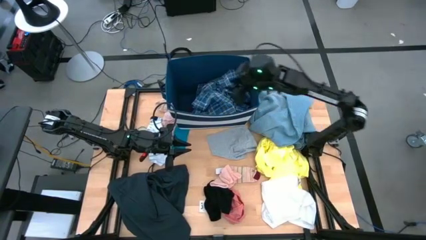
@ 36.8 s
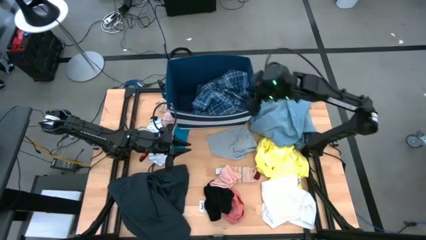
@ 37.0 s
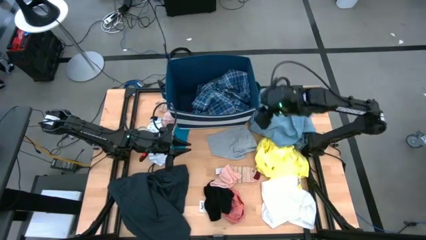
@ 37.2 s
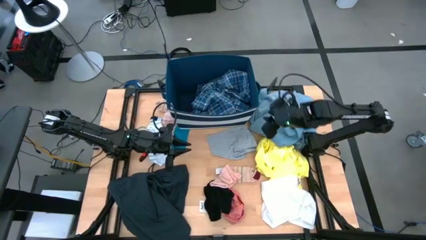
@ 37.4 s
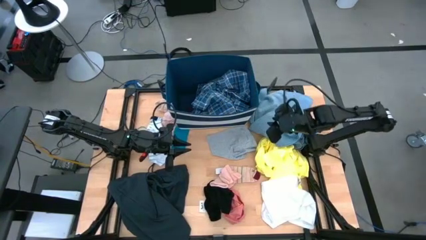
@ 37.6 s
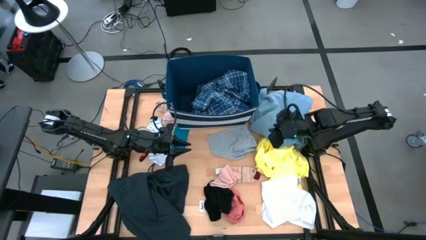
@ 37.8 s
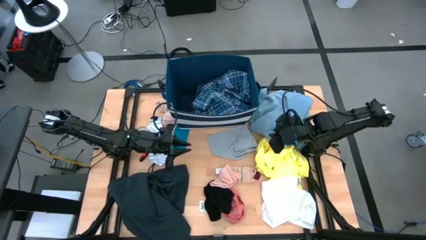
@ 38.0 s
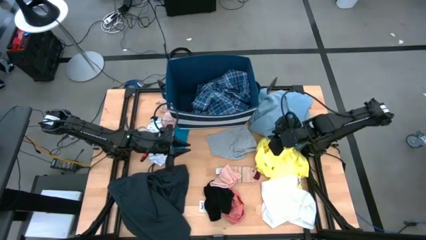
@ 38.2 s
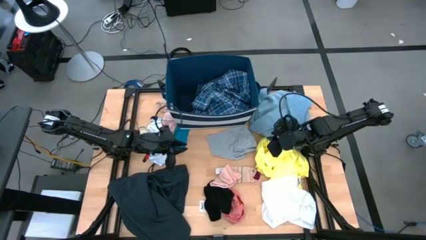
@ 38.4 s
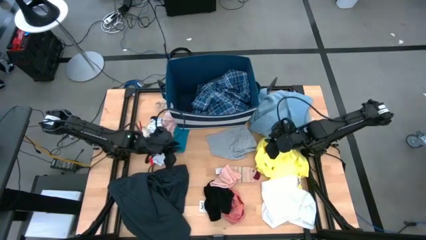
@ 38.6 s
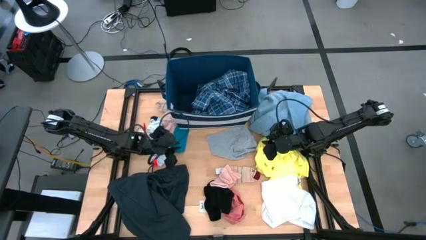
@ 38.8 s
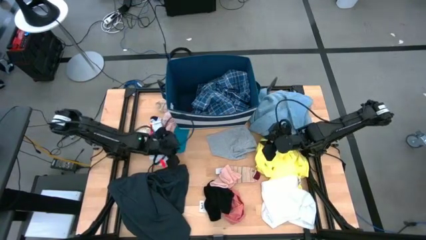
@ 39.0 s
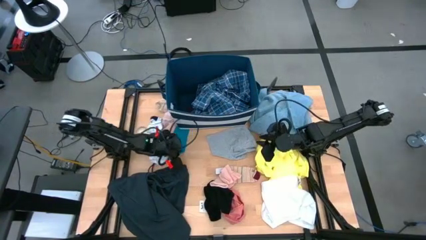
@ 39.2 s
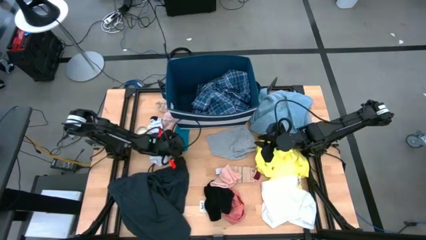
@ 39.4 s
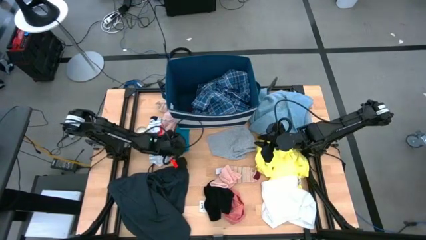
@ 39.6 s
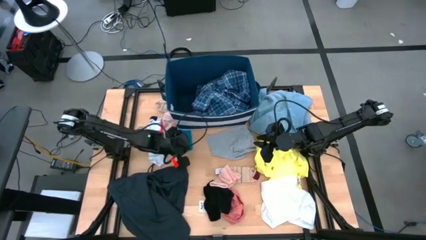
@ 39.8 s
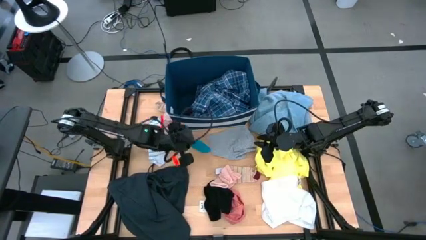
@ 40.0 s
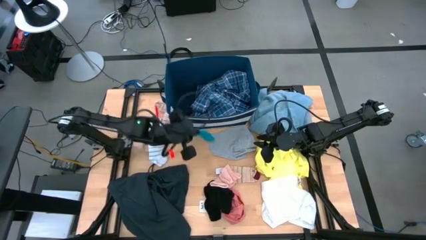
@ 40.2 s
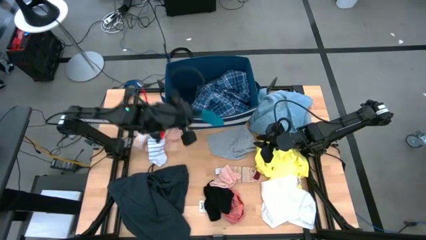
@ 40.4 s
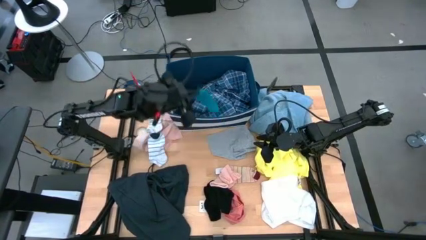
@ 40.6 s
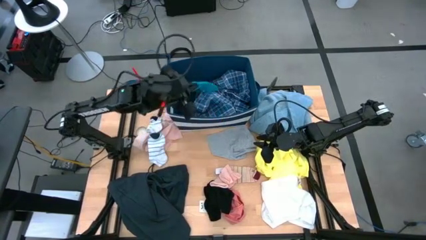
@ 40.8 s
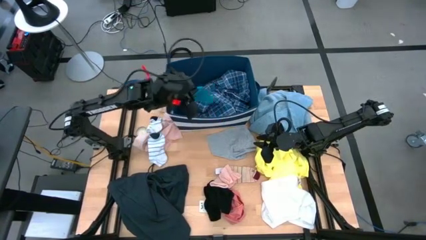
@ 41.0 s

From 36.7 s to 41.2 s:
Task: Sort clothes
Put the blue sock into the blue laundry organizer

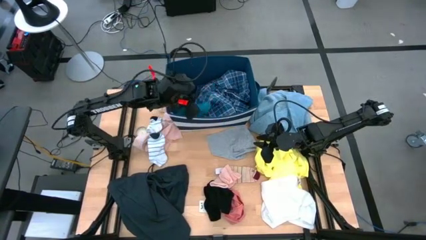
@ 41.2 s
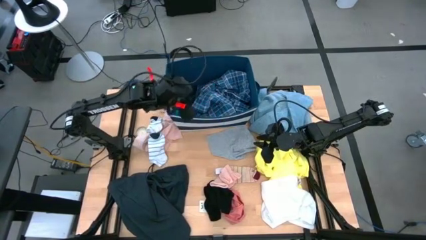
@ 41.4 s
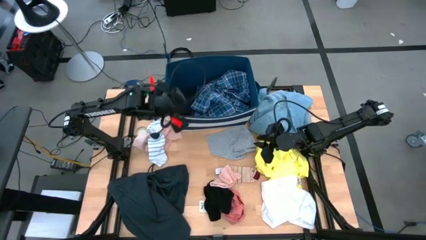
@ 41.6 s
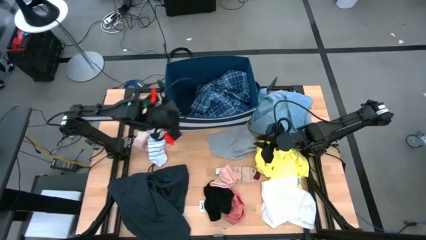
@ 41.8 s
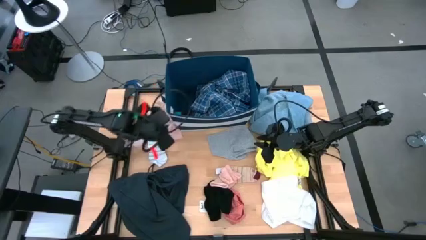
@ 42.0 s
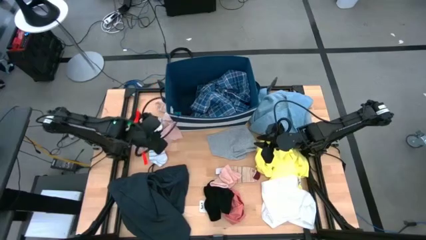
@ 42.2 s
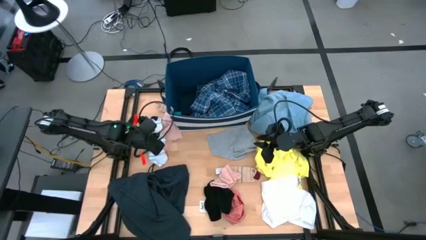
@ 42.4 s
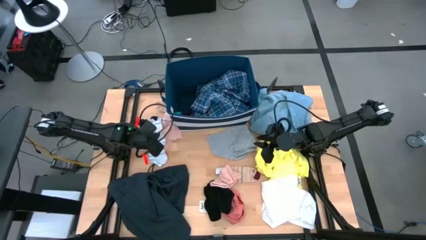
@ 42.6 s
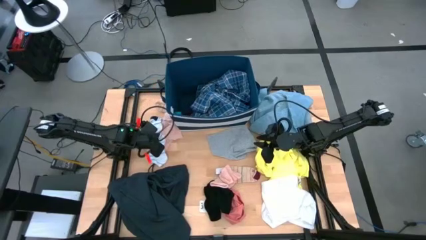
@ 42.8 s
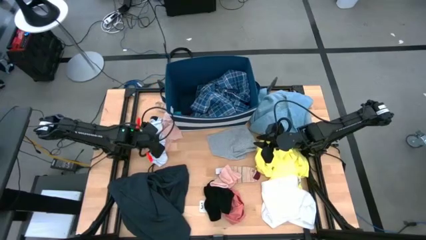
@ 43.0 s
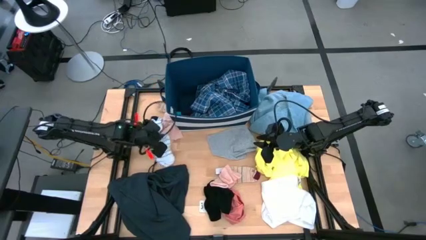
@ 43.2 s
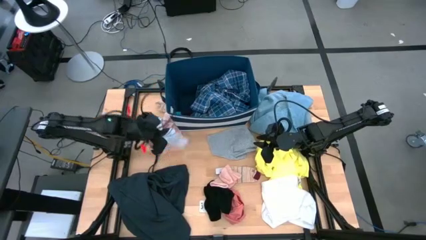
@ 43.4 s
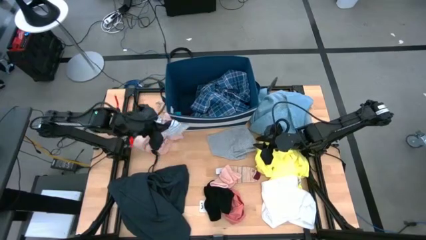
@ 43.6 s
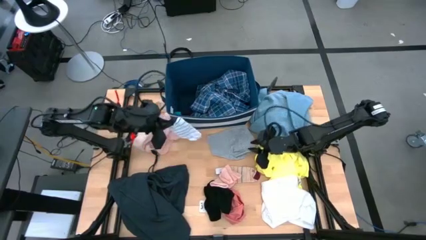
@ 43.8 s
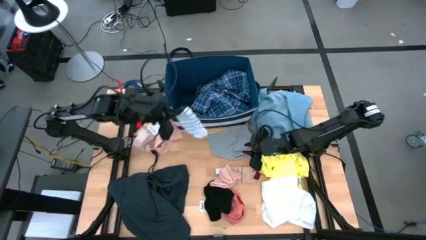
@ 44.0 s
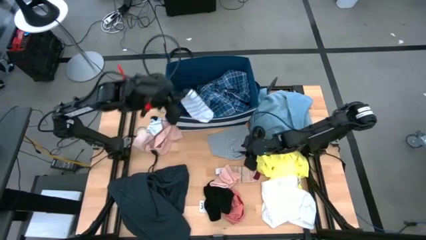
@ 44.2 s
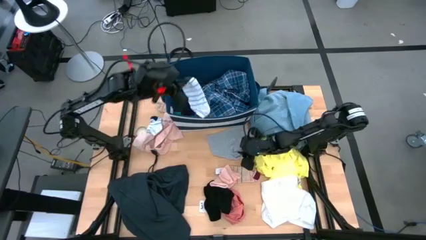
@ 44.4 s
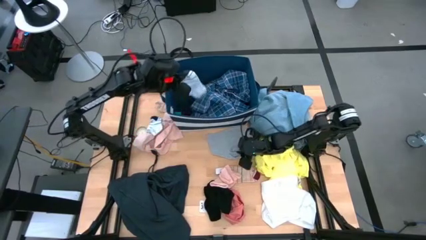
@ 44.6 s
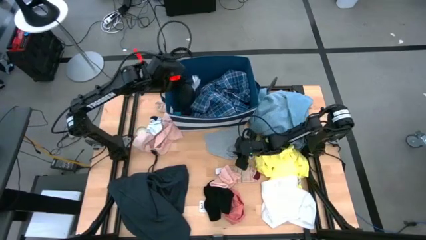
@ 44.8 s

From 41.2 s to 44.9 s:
Put the white striped sock into the blue laundry organizer

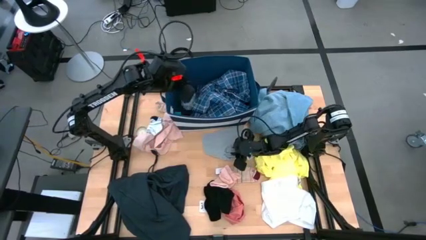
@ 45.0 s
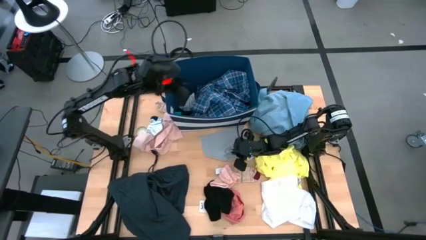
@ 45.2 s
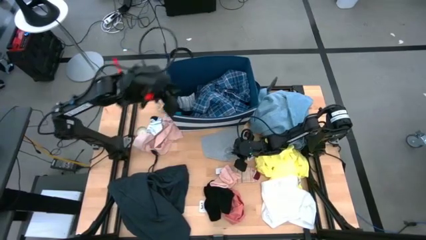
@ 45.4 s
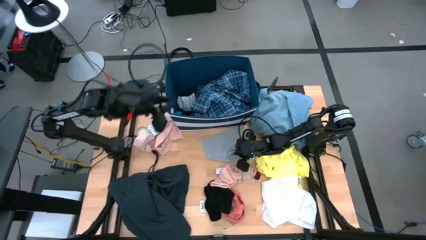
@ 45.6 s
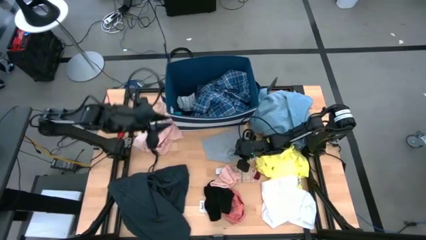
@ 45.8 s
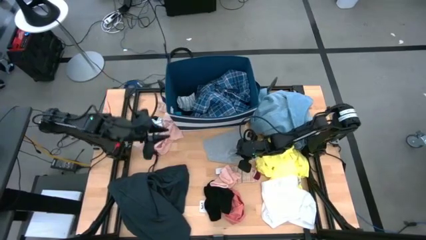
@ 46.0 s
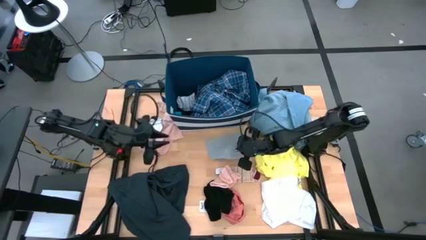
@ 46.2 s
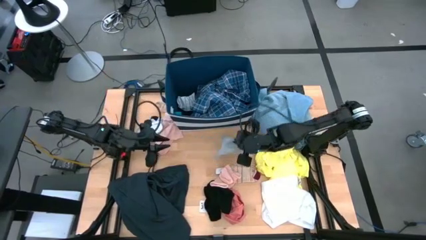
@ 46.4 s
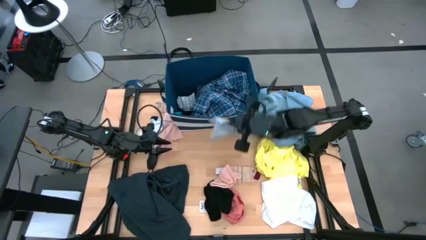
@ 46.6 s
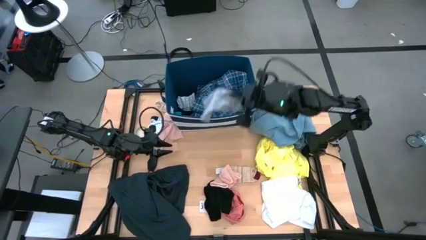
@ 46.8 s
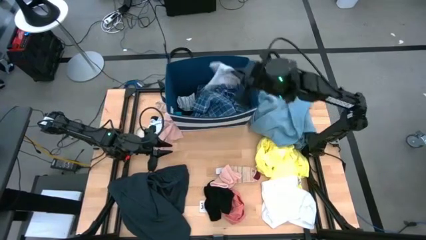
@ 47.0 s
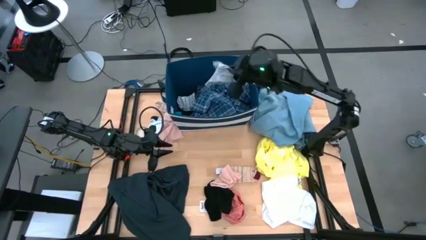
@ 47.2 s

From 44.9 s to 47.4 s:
Put the gray underwear into the blue laundry organizer

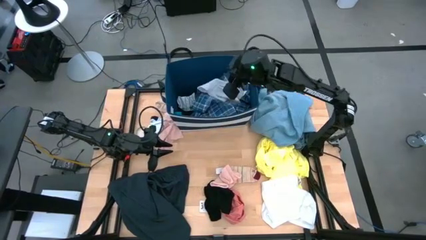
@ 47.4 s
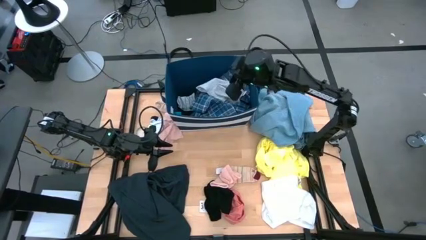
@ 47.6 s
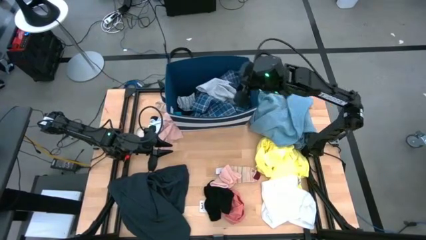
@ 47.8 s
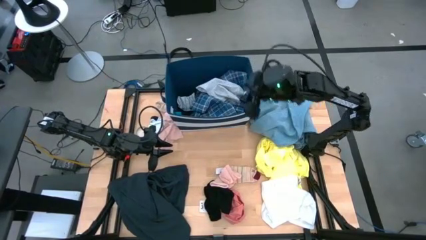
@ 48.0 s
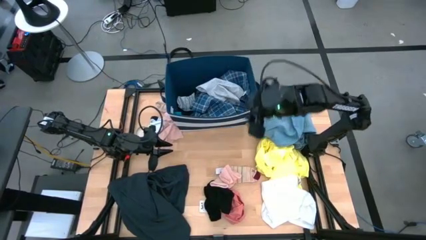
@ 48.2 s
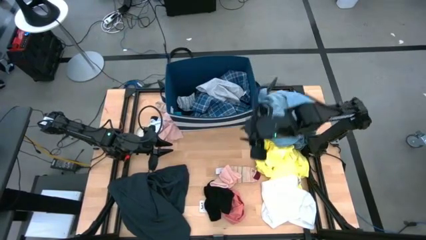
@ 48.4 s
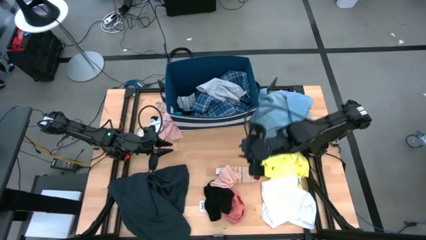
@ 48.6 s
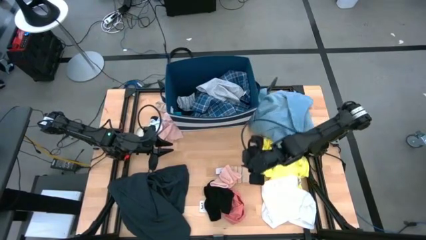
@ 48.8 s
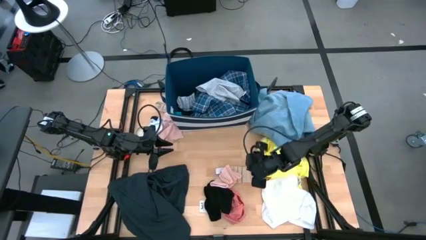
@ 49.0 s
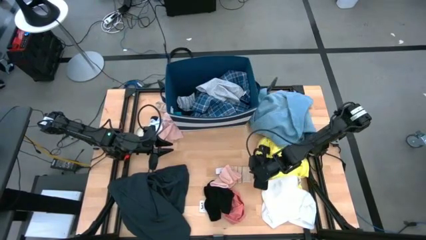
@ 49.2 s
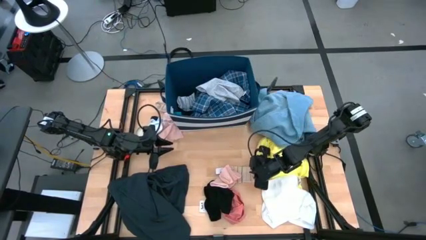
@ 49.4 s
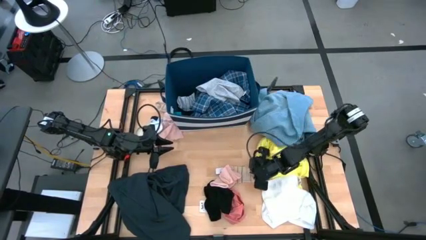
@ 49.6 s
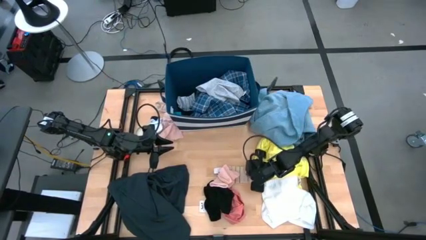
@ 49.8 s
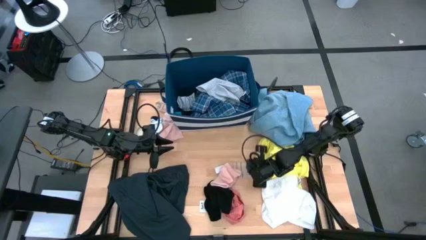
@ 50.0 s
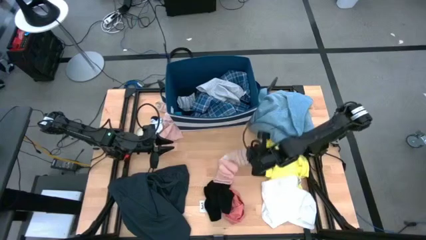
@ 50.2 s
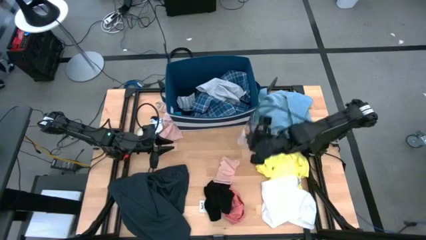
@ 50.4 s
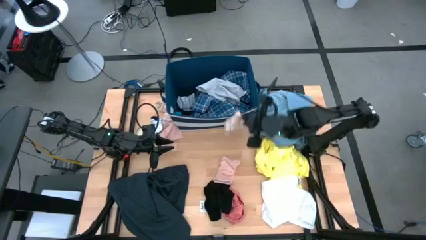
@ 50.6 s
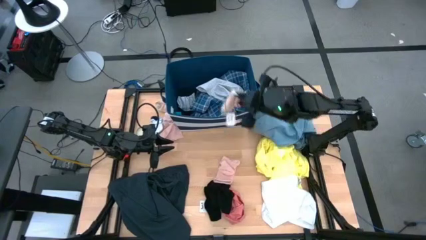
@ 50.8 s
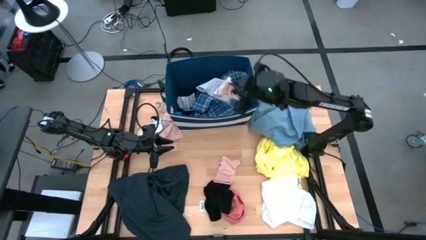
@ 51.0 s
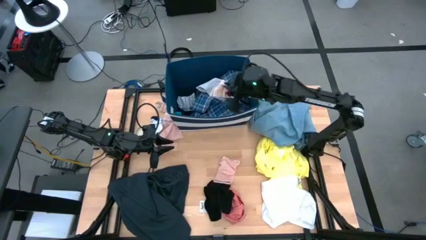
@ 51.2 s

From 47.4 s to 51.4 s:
Put the striped light pink sock into the blue laundry organizer

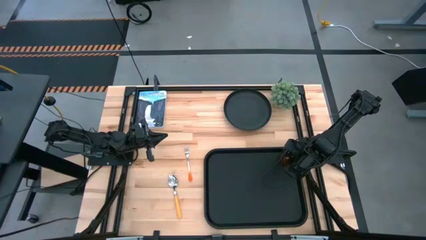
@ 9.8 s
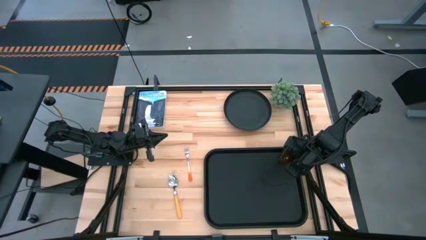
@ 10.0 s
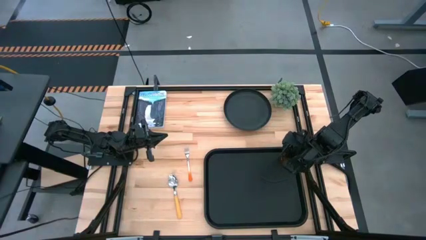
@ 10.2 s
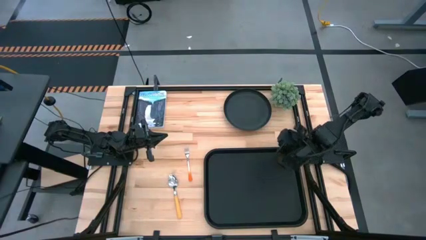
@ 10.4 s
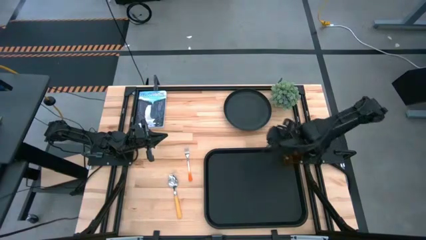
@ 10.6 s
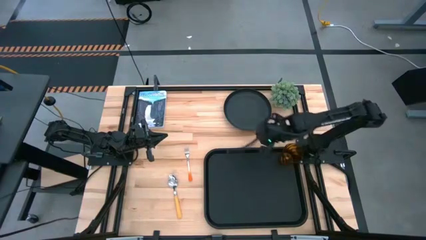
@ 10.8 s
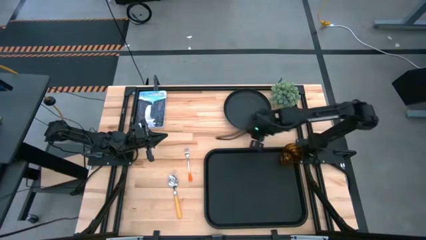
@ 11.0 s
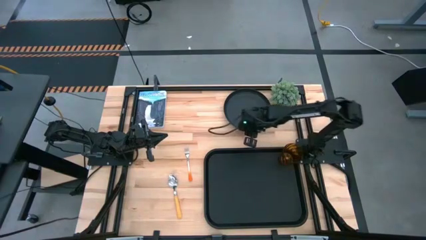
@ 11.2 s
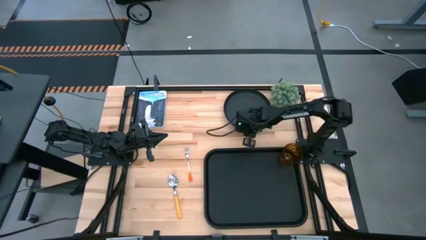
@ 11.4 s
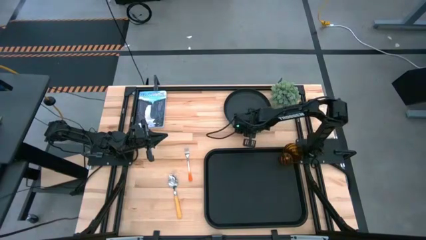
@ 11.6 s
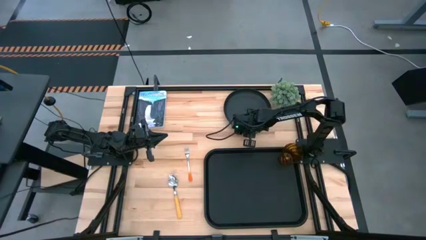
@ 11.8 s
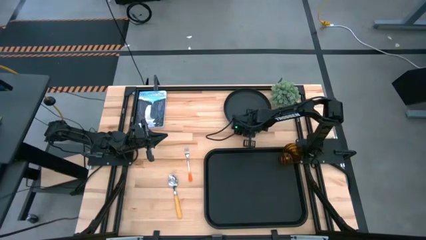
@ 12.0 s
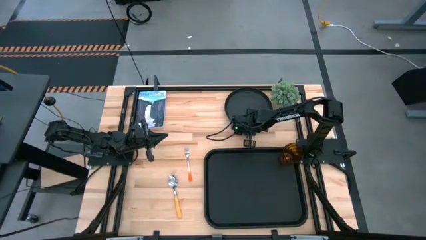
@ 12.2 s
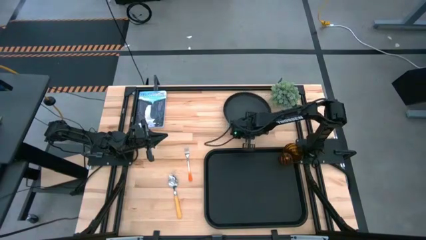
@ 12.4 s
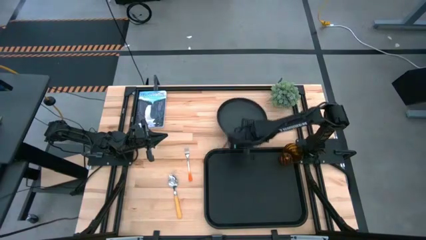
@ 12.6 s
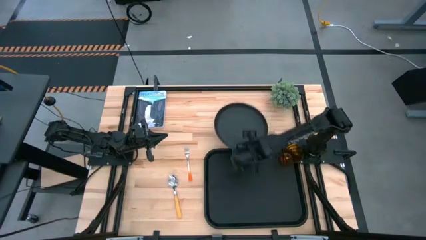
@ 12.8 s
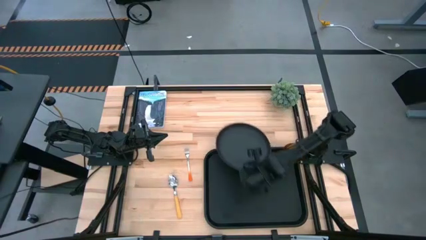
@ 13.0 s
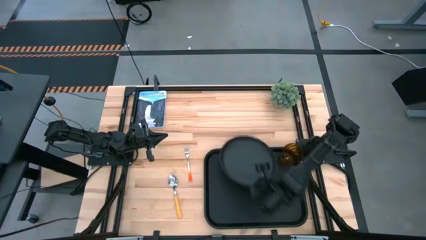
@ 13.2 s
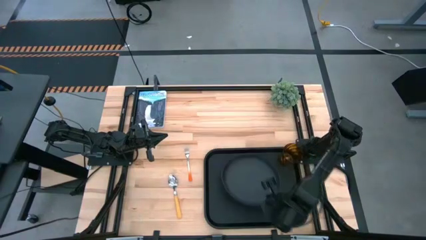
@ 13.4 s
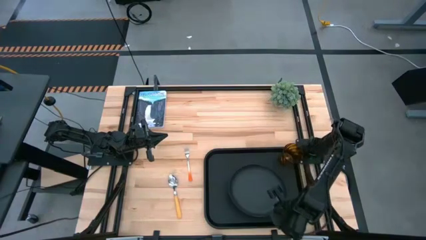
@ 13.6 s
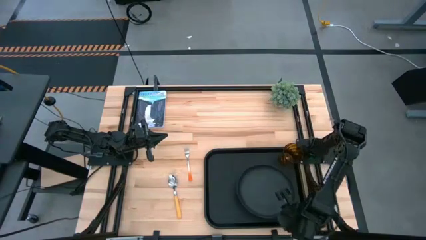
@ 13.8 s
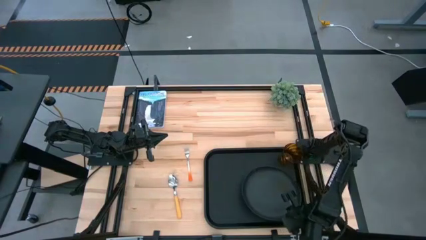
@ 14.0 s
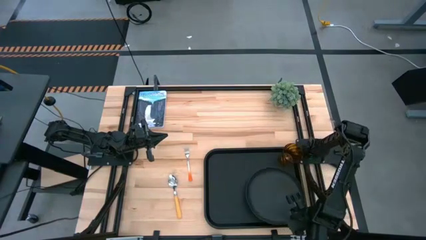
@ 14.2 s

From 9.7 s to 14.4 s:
Task: Pick and place plate/cup/fork/spoon on tray
Put the black plate on the black tray
